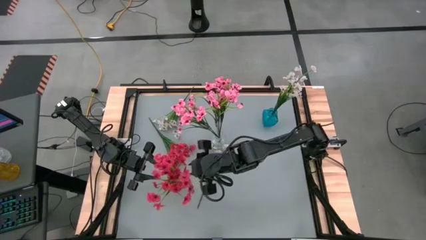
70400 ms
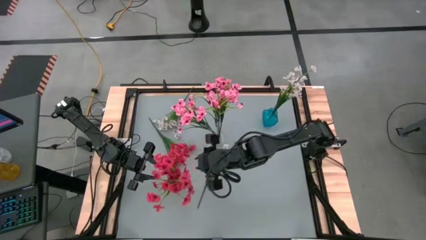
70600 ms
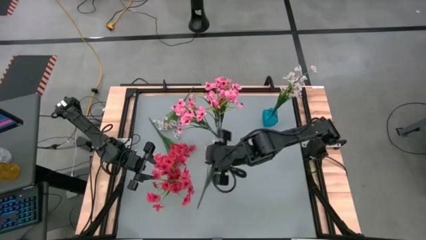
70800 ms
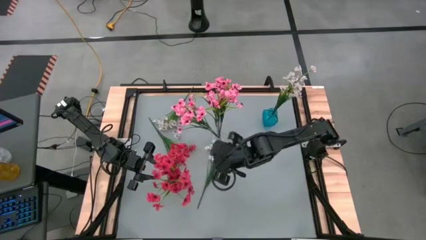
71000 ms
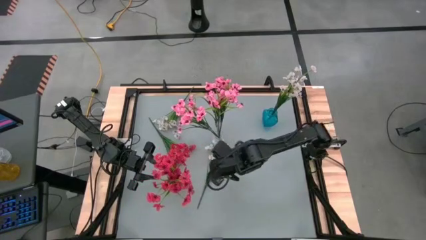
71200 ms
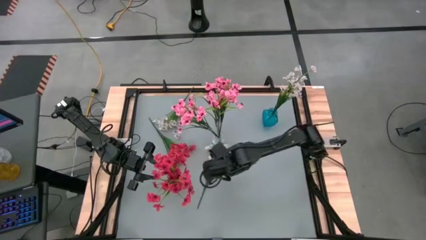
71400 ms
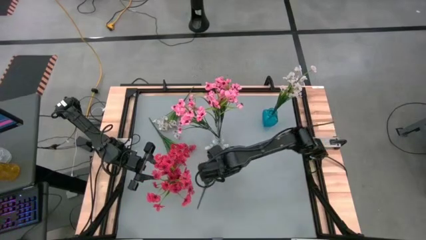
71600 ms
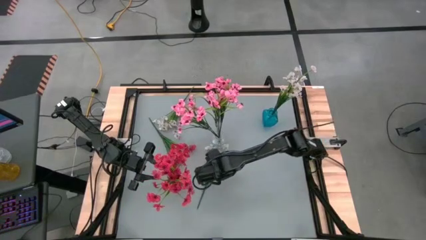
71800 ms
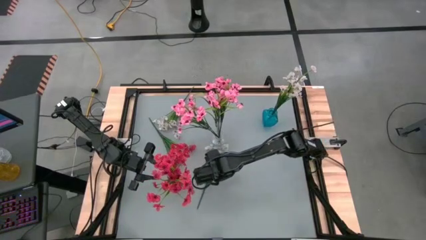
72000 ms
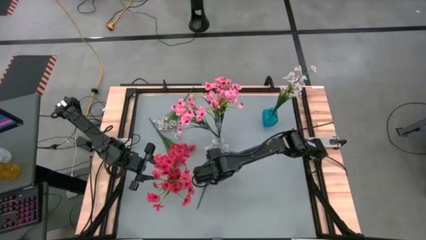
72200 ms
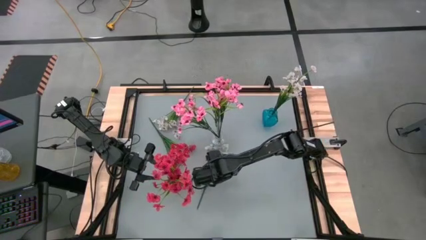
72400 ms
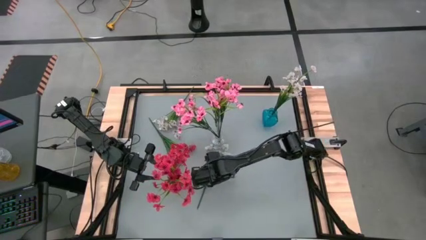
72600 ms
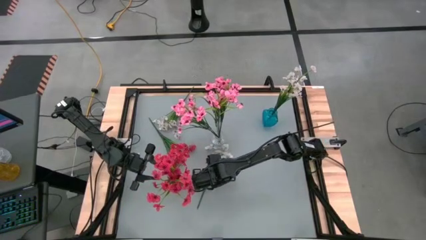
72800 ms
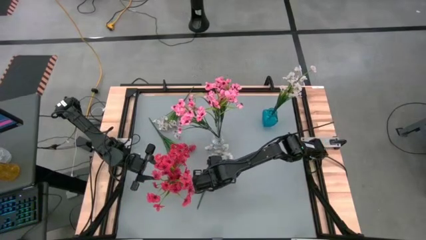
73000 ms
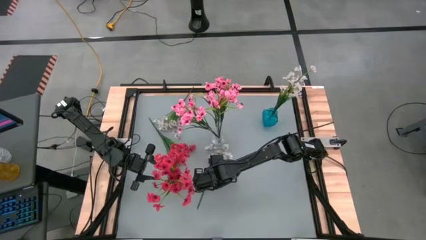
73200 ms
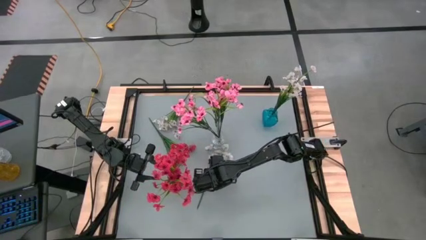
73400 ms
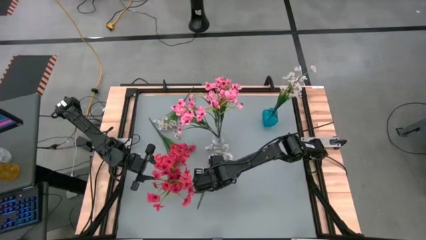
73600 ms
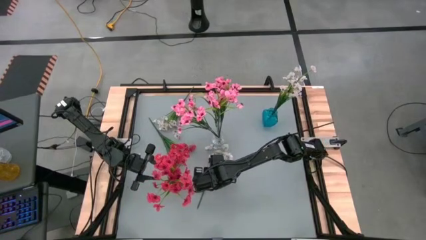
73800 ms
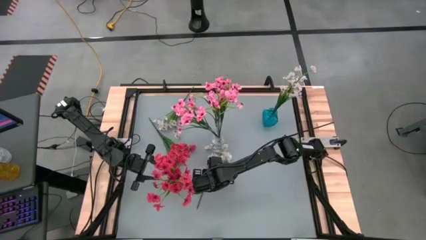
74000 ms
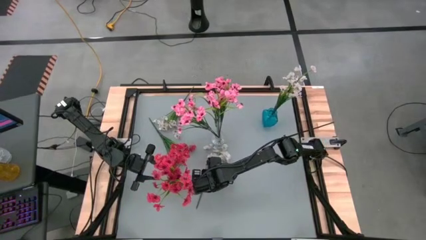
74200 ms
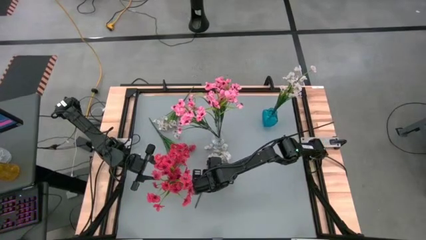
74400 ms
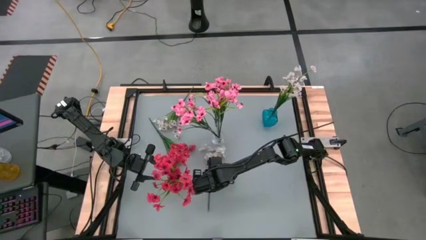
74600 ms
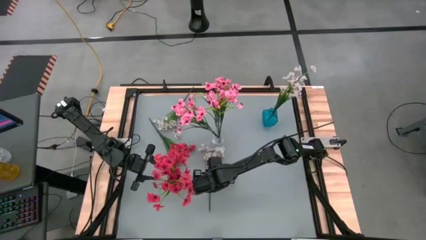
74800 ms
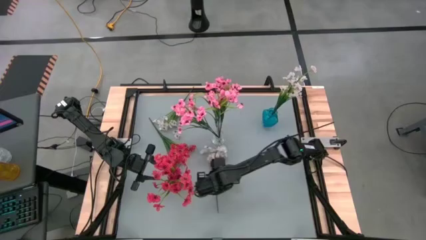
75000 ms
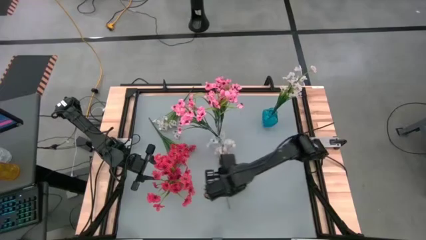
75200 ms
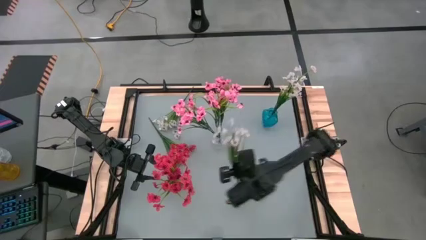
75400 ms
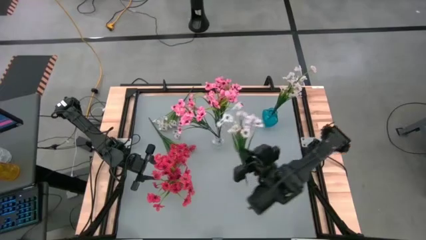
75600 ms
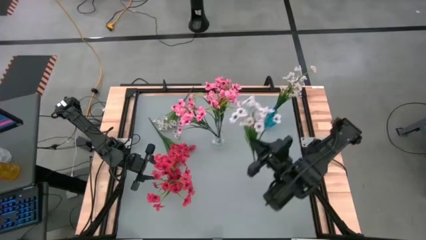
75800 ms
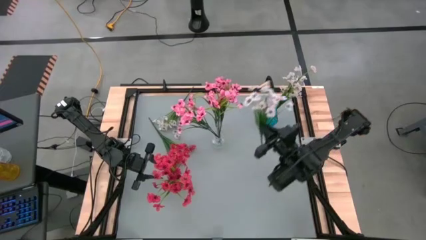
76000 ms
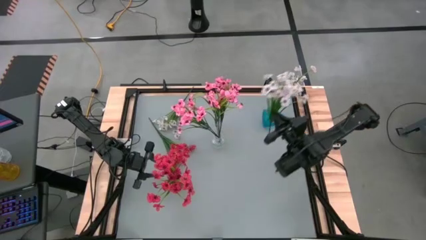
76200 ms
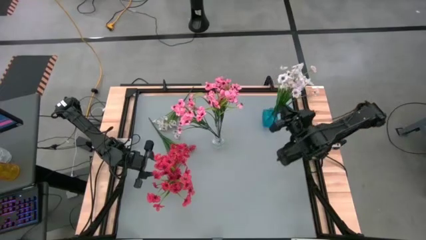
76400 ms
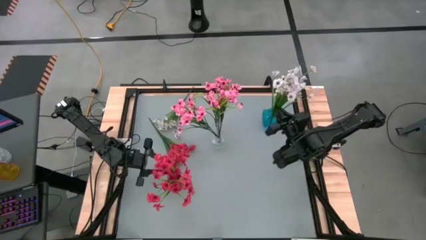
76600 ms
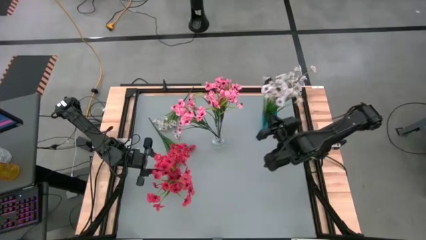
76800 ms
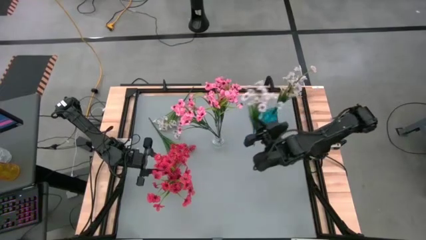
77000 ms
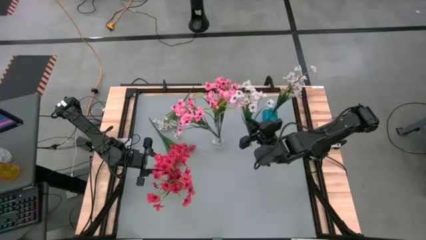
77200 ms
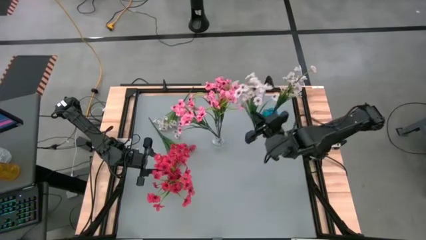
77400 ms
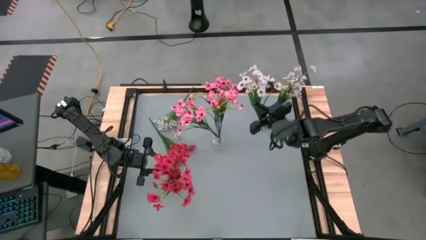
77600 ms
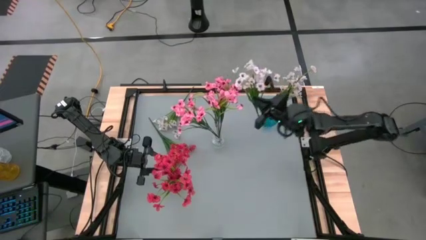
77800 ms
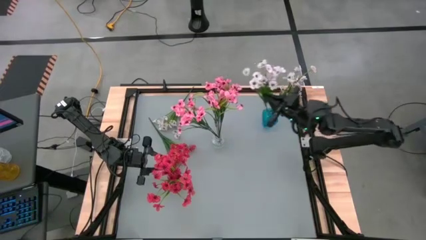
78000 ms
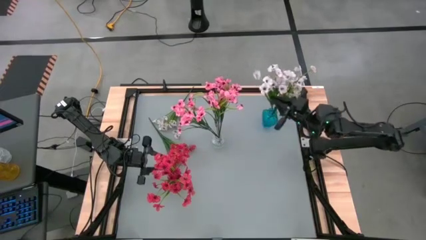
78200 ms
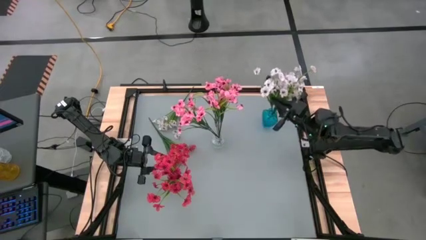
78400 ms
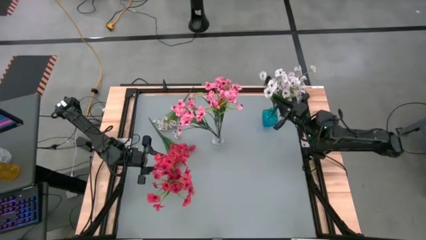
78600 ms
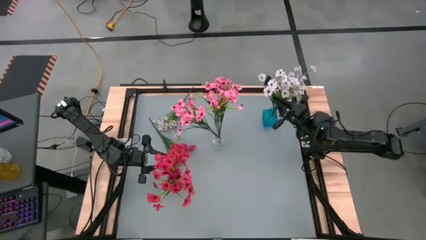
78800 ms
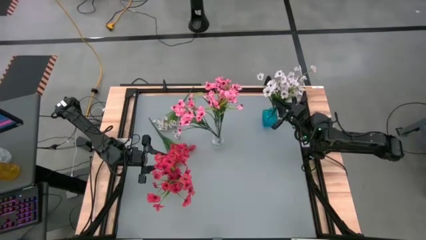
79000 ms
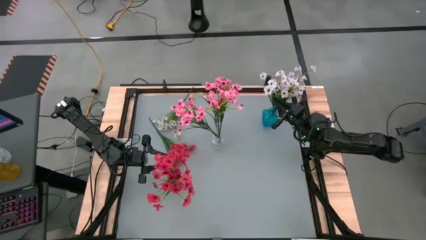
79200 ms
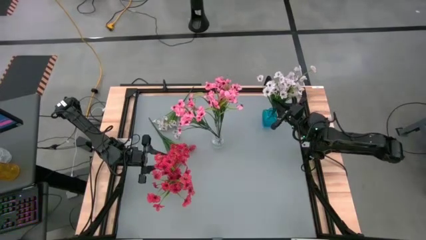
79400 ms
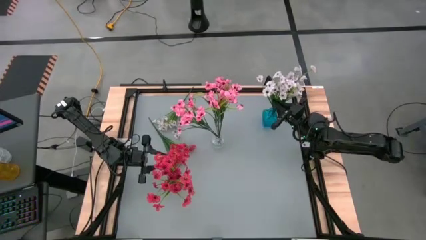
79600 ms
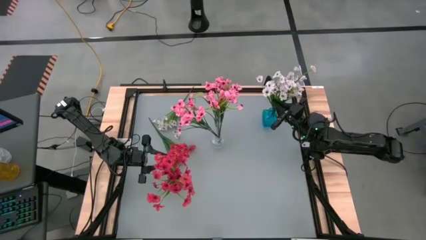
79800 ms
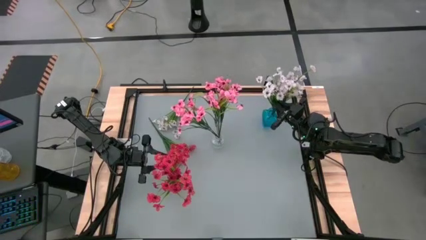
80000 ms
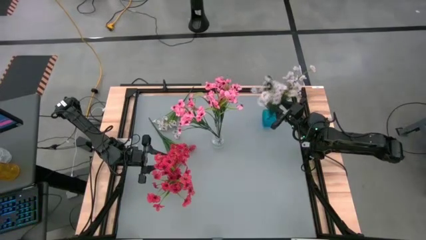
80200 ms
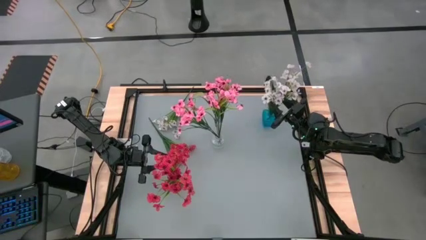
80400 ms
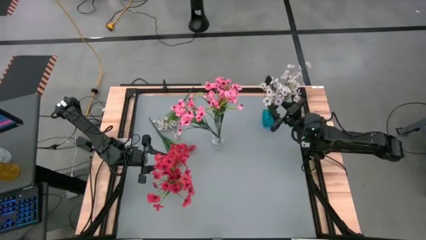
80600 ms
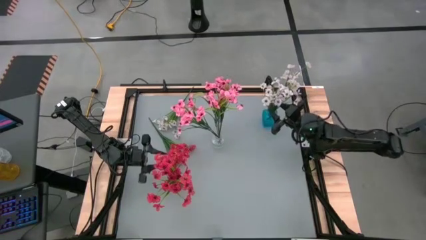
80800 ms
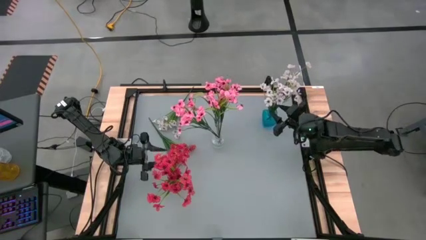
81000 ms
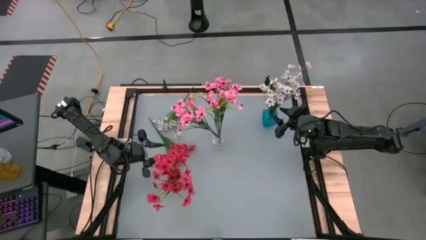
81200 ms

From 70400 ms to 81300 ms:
Task: Sort flowers into vase by color
Put the bottom white flowers into the blue base

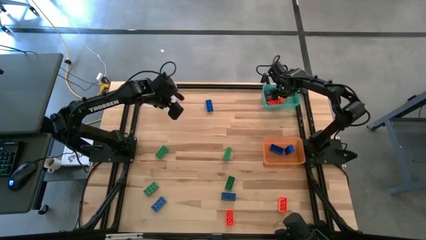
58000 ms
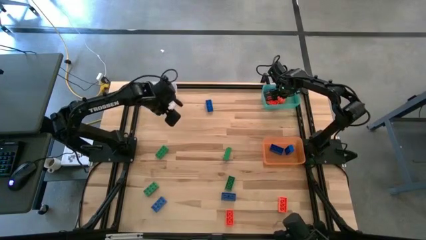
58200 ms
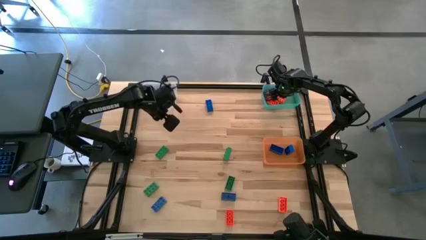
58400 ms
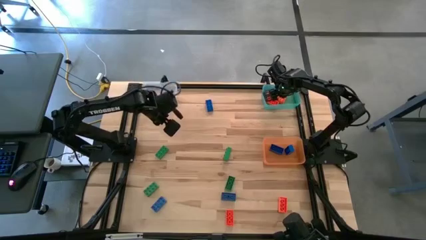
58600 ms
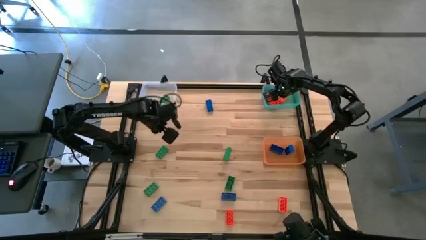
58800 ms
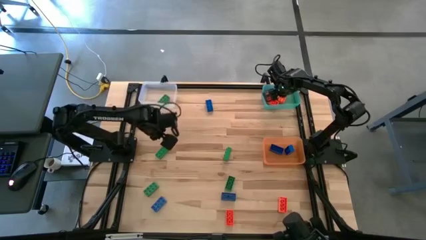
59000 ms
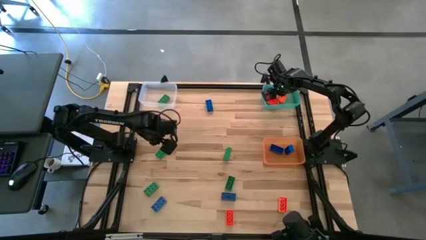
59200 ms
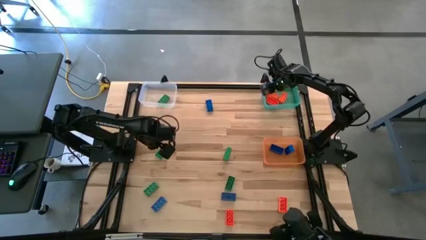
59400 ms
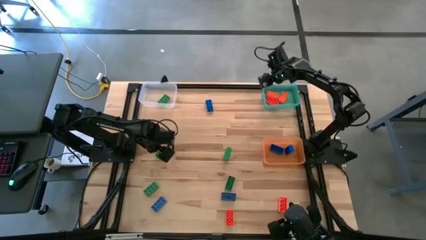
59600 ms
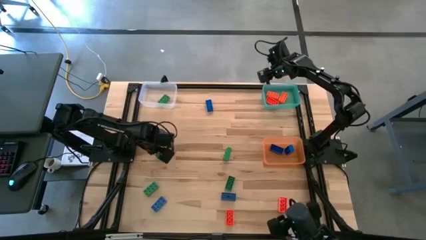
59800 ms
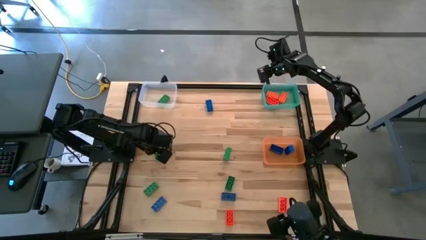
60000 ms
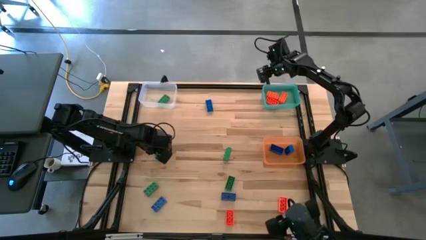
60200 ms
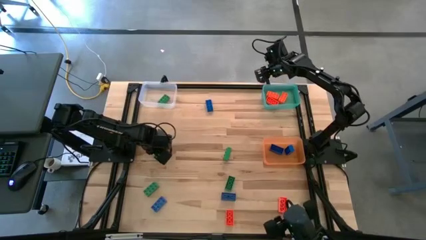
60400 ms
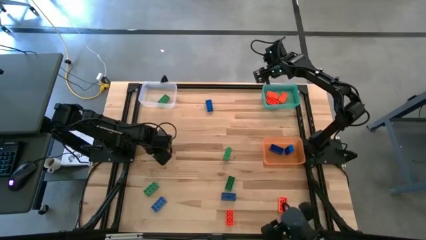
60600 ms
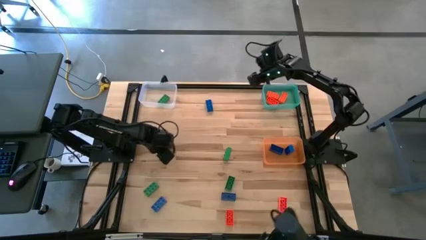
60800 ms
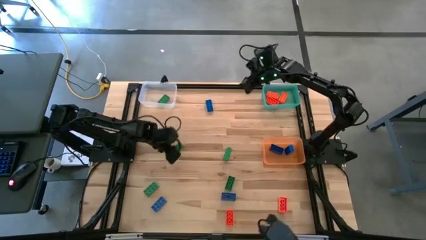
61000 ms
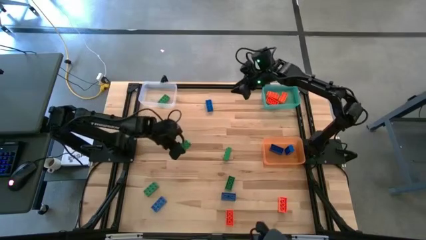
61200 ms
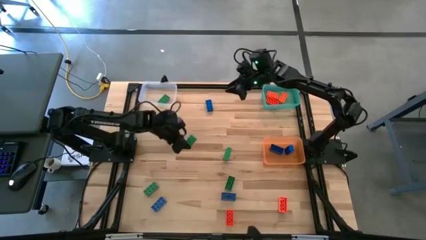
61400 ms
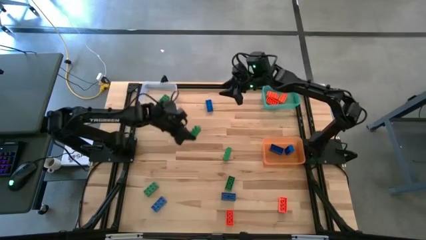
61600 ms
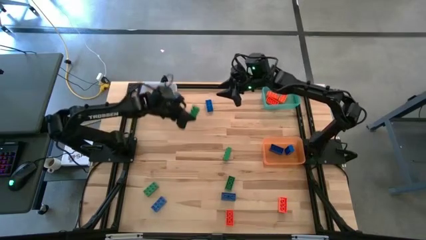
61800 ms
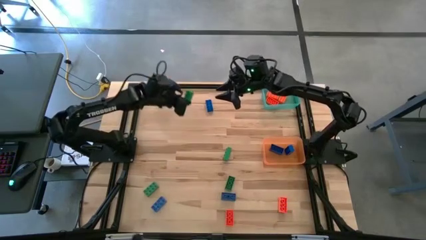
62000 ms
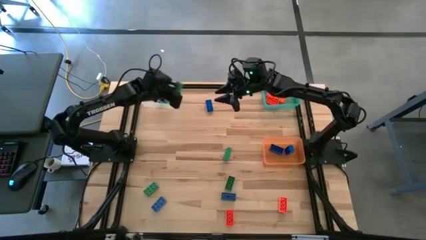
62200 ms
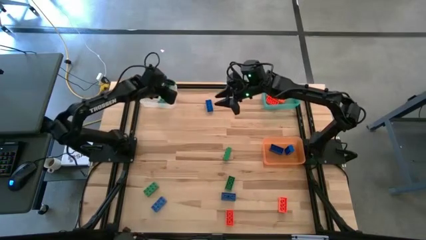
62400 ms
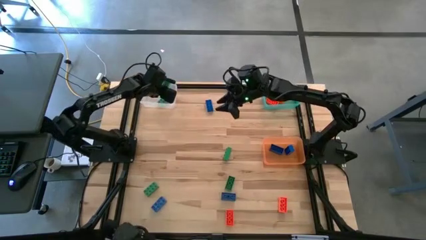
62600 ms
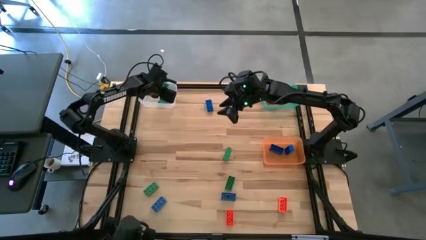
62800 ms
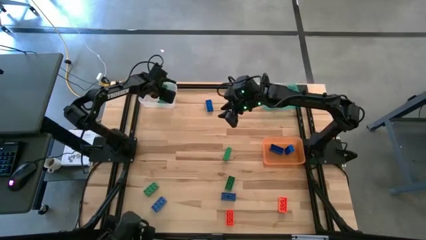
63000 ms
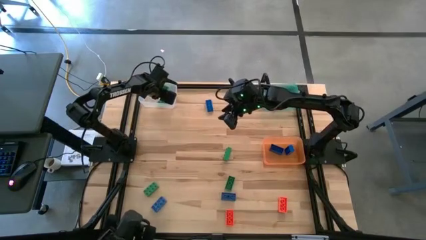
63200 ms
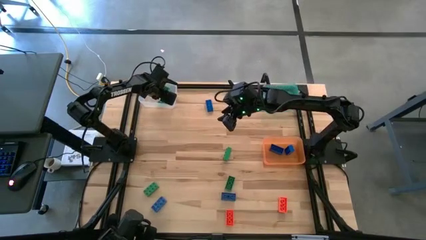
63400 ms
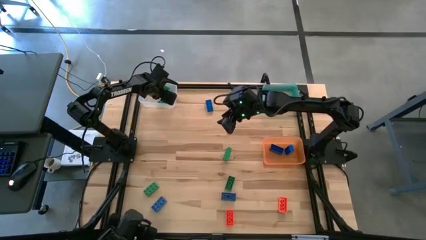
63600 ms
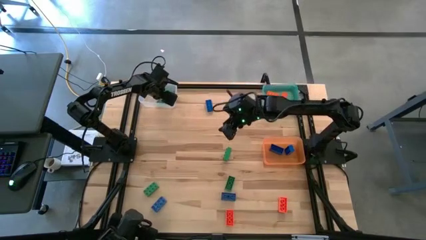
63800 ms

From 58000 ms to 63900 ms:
Task: Sort & place blocks by color
Put the green game piece into the transparent bin
